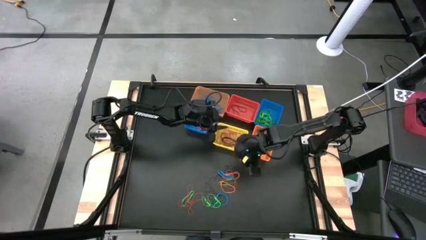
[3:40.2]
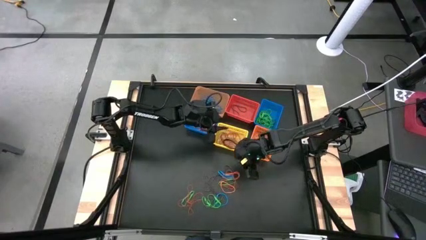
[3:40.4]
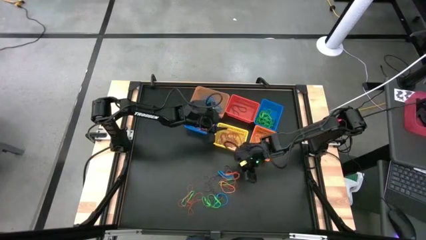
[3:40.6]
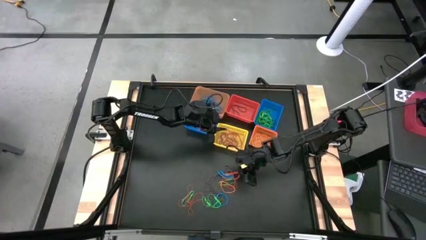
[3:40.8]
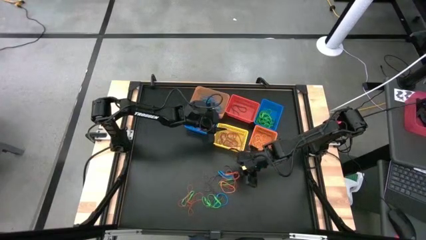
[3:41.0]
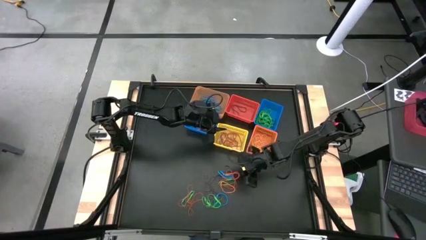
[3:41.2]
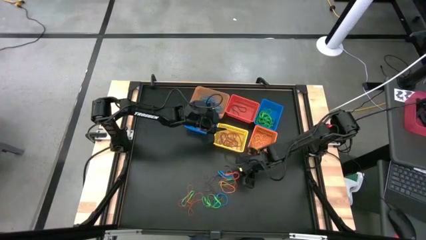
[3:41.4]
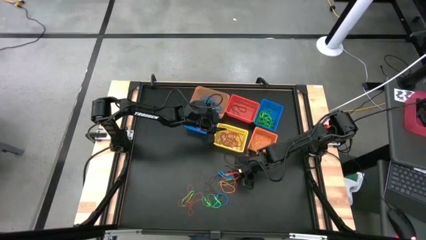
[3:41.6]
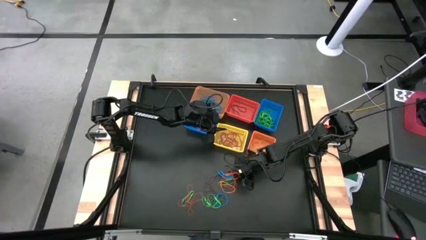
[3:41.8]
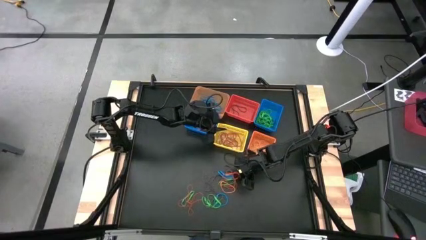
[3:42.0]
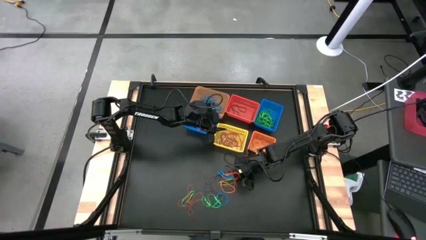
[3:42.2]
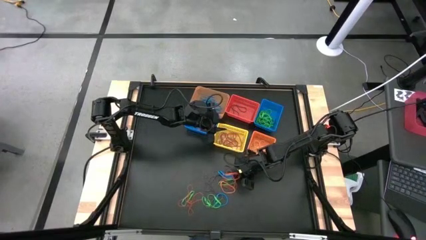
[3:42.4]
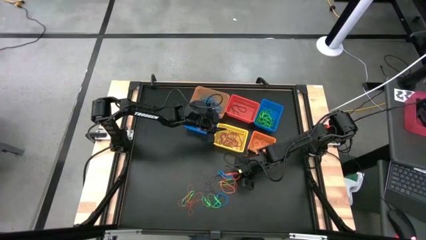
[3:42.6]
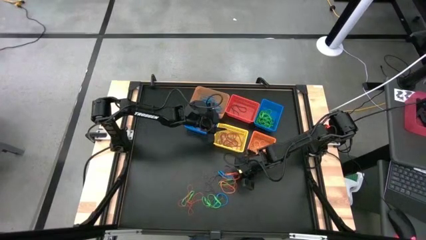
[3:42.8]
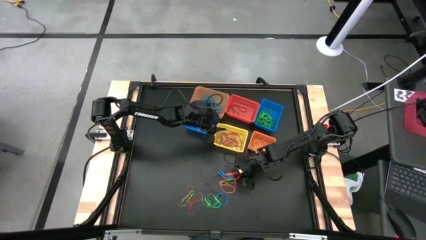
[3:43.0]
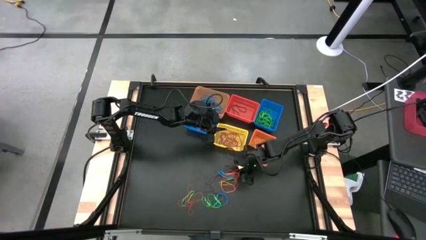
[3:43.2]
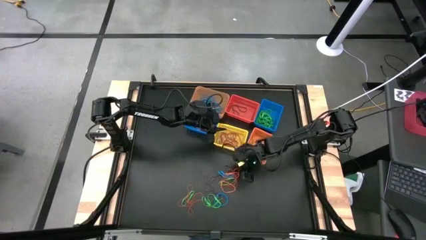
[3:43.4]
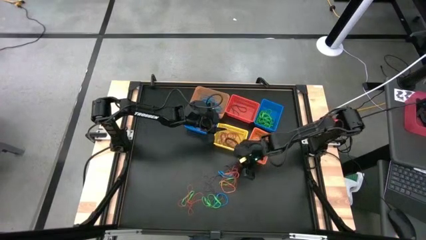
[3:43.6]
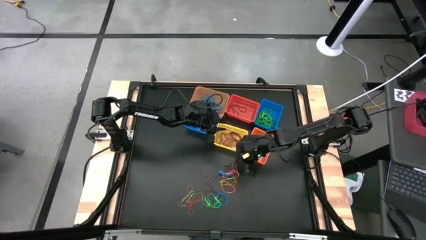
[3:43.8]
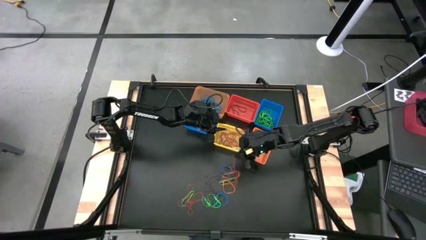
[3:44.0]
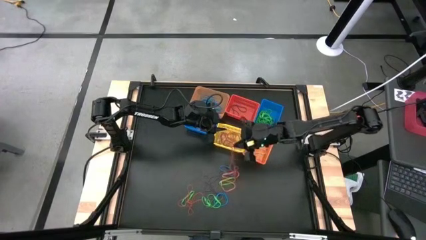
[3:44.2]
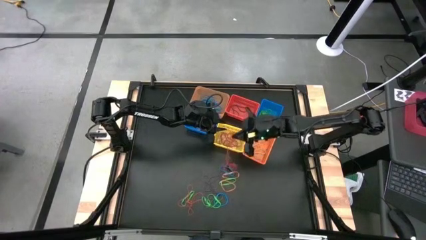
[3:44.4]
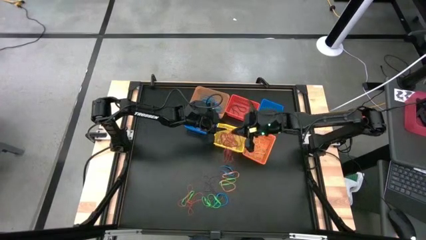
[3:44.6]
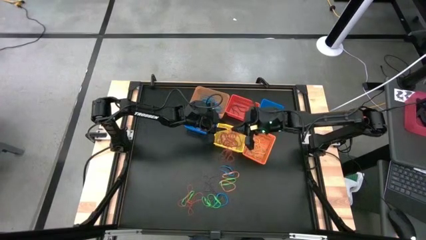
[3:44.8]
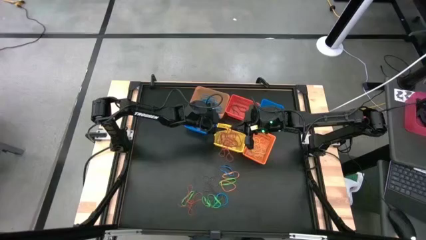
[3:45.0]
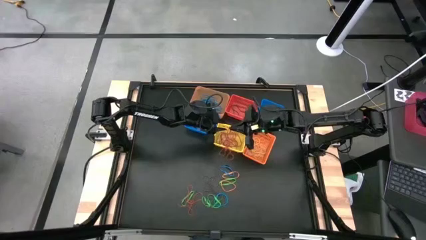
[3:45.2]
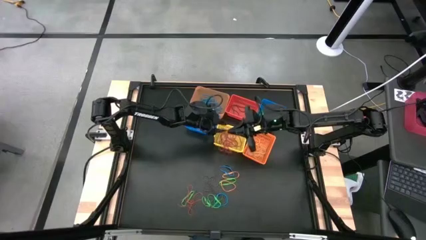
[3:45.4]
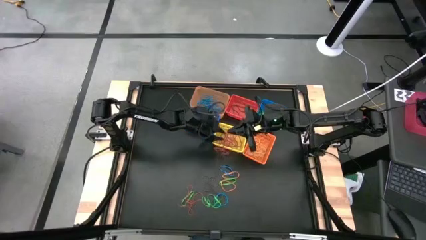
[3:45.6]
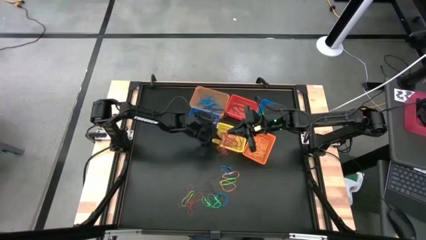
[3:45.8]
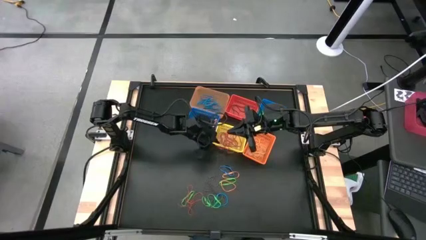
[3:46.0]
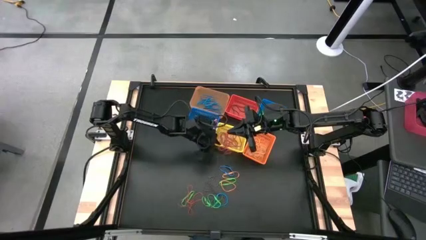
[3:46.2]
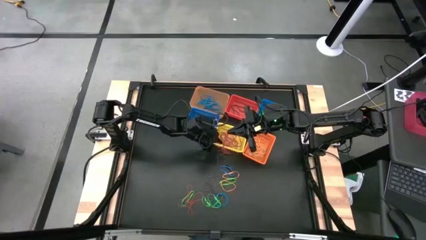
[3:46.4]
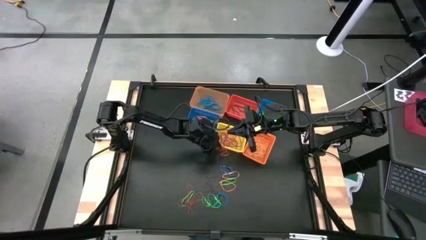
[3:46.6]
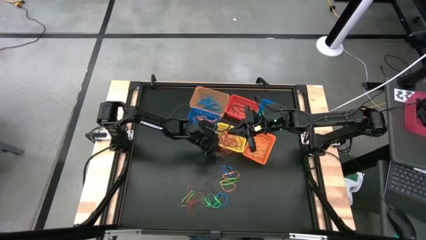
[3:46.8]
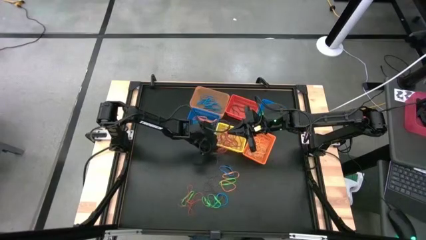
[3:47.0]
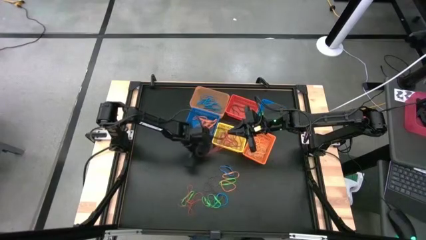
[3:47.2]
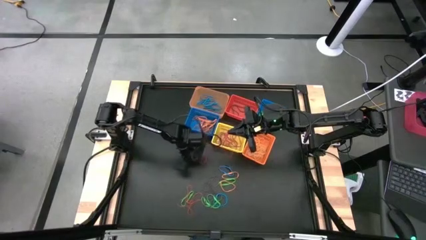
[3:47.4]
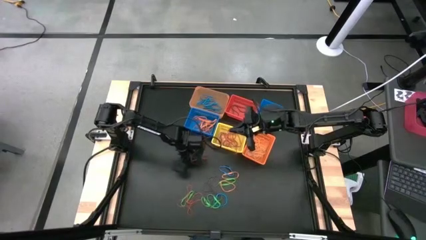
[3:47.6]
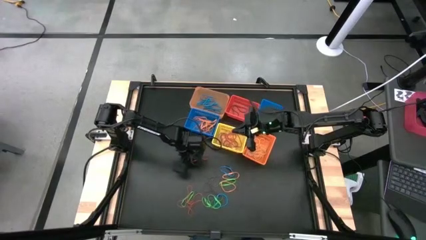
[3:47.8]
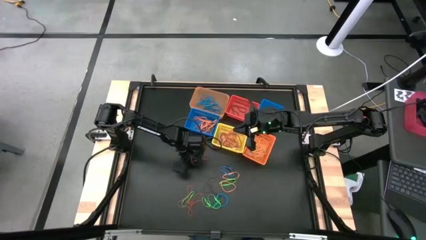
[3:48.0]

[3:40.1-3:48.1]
Task: Sort rubber bands into baskets
Put the red rubber band into the yellow basket

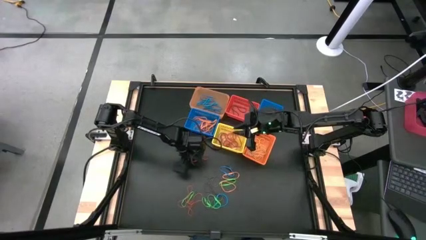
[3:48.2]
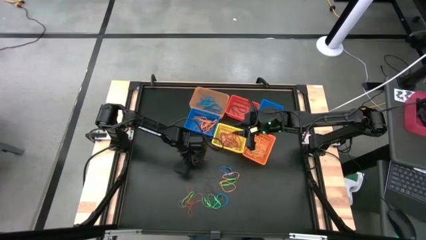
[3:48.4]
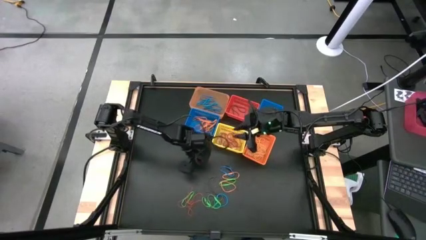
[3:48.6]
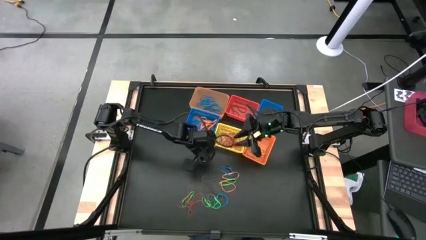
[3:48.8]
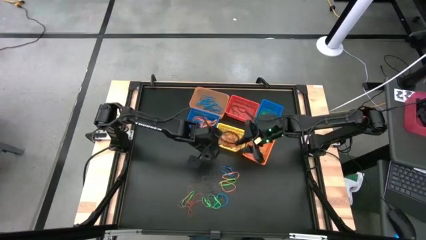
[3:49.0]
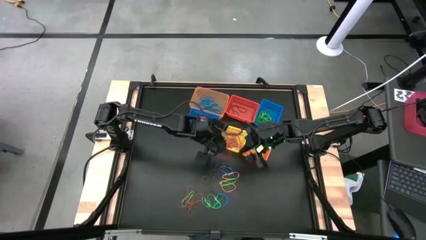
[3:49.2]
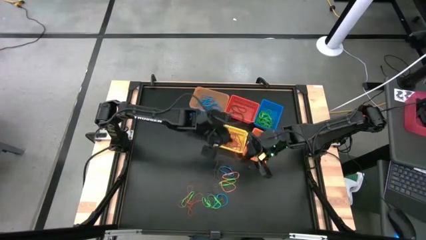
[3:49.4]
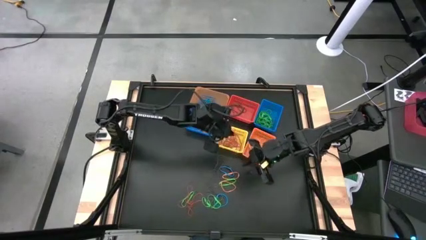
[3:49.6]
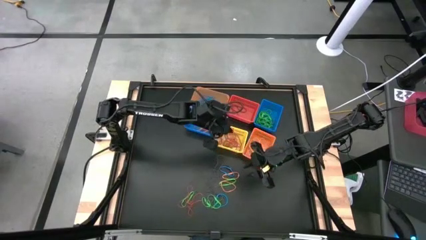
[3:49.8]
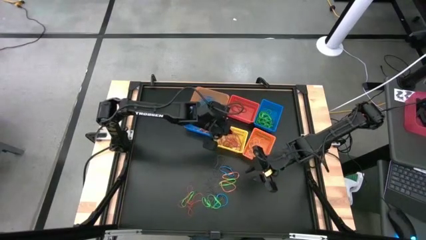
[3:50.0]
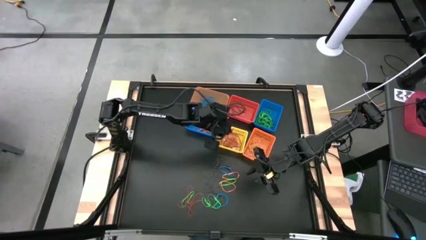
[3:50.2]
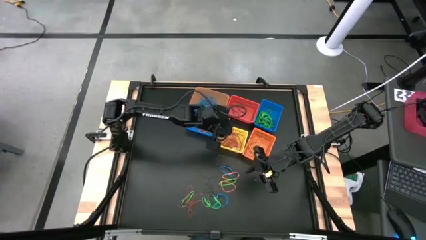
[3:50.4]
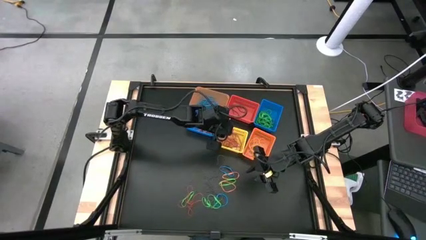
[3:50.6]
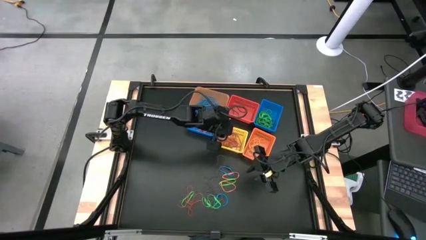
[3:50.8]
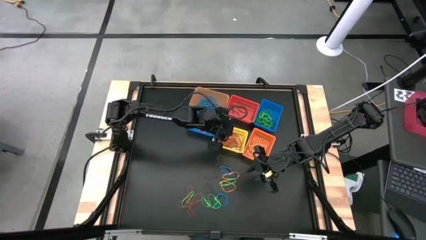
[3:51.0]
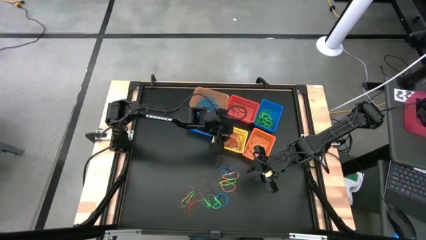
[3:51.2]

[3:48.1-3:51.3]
Put the red rubber band into the yellow basket

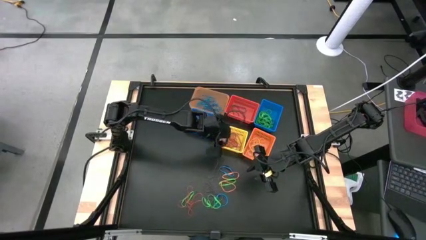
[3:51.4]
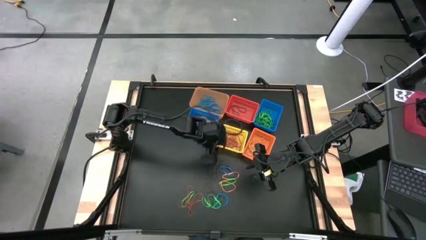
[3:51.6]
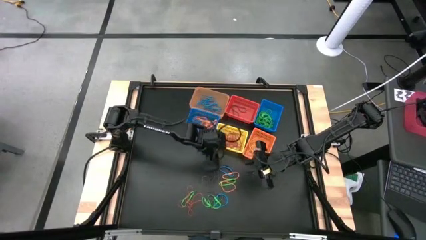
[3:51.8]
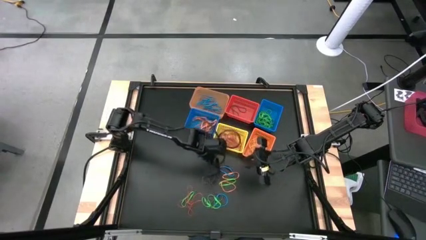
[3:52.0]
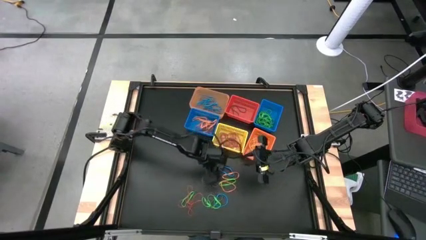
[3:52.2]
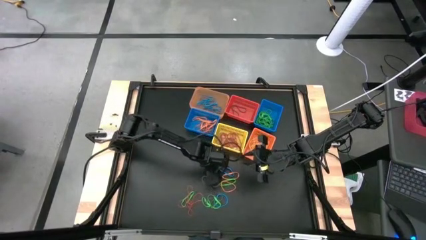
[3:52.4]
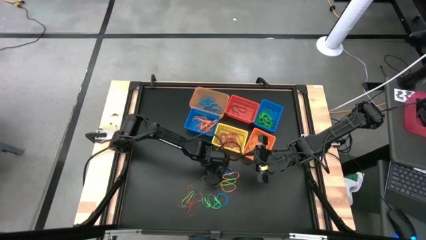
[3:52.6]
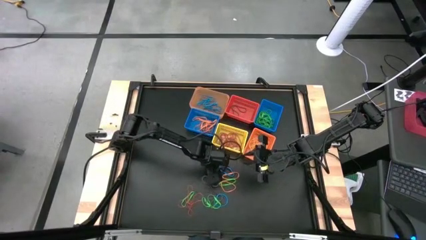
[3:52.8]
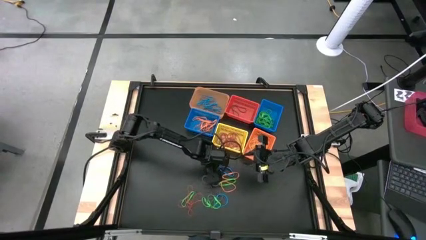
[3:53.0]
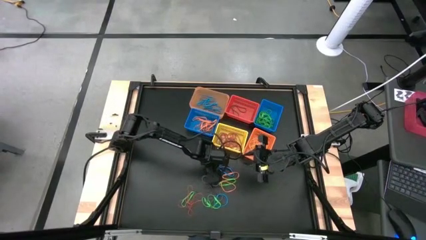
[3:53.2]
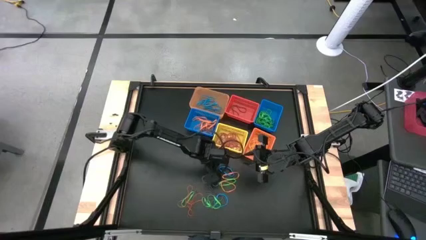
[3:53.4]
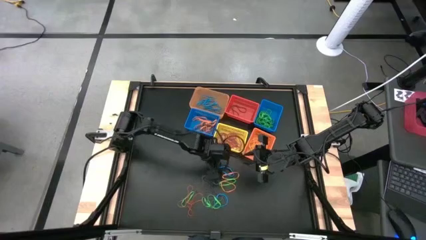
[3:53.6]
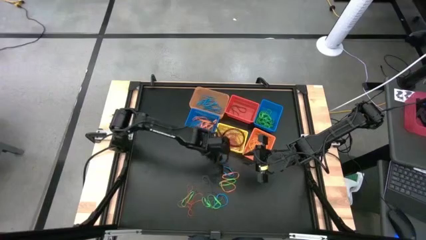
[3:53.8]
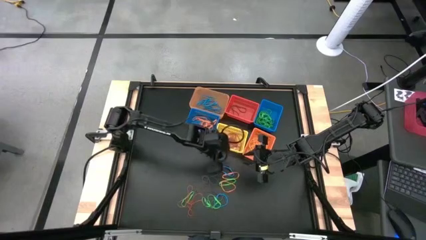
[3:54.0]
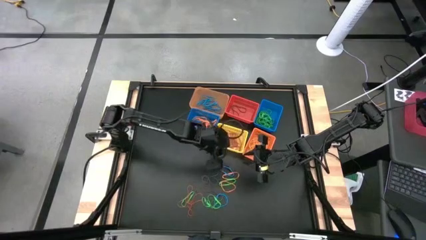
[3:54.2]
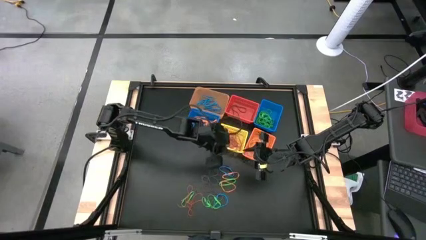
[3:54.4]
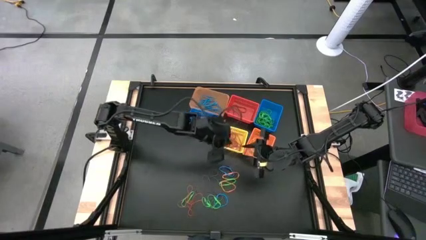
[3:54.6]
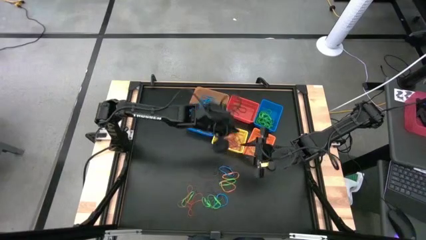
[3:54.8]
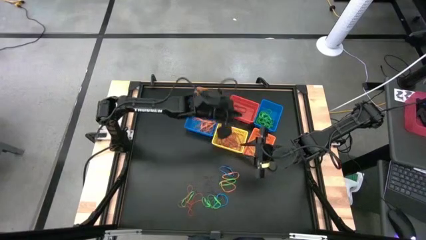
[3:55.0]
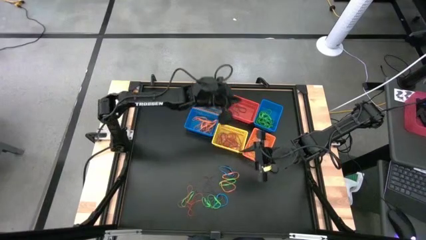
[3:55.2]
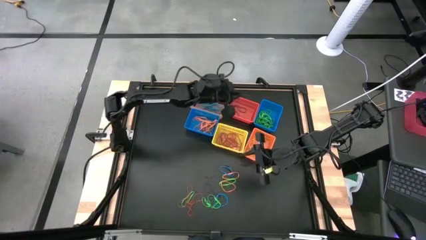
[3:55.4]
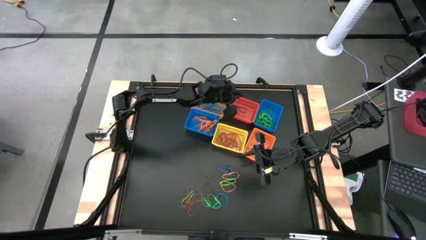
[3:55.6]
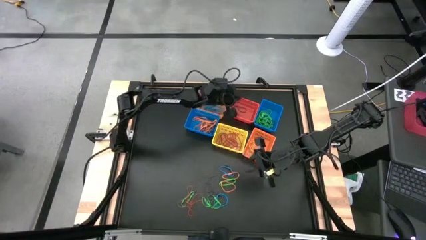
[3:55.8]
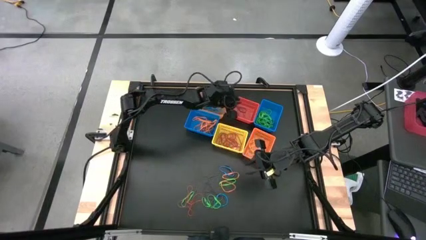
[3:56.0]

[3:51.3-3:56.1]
Put the violet rubber band into the pink basket

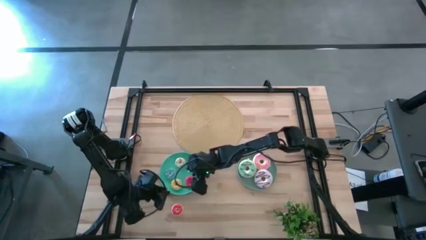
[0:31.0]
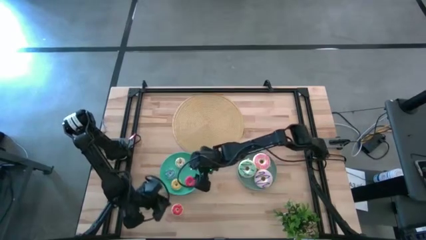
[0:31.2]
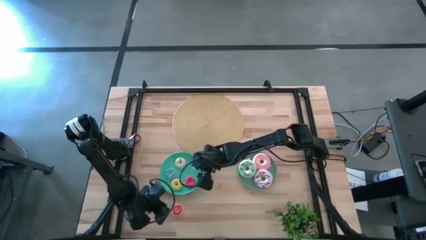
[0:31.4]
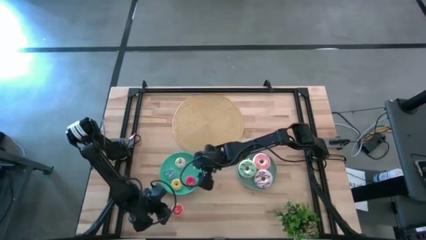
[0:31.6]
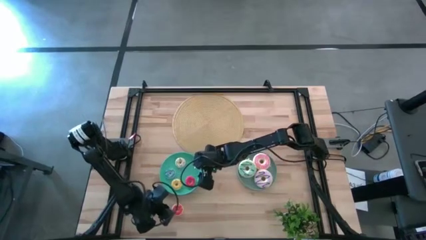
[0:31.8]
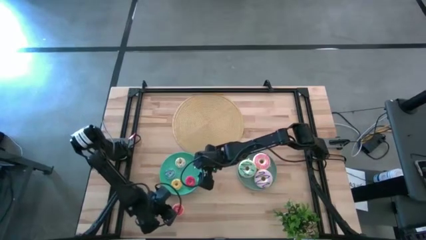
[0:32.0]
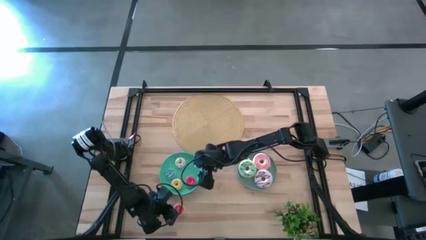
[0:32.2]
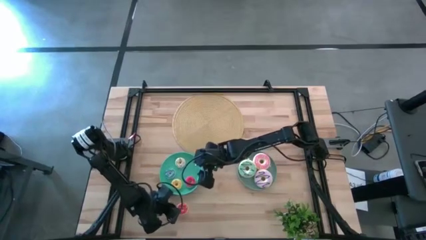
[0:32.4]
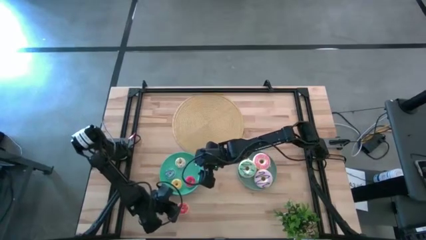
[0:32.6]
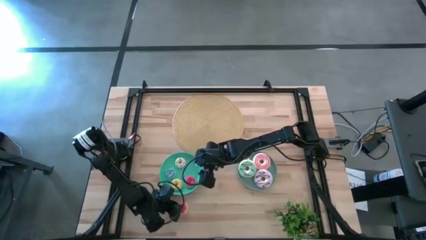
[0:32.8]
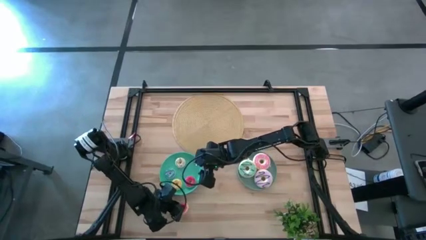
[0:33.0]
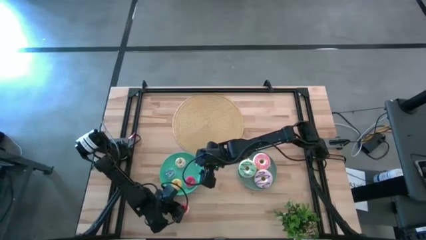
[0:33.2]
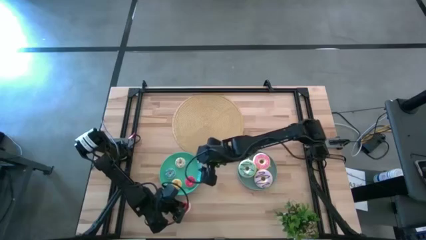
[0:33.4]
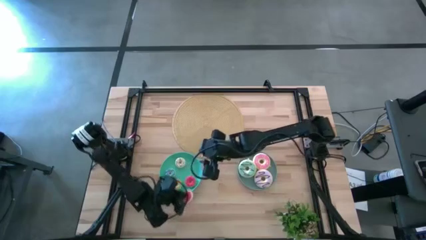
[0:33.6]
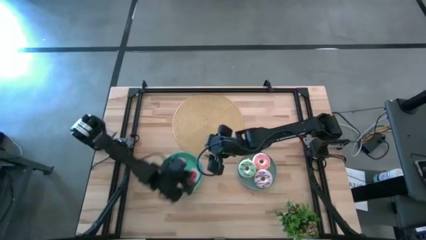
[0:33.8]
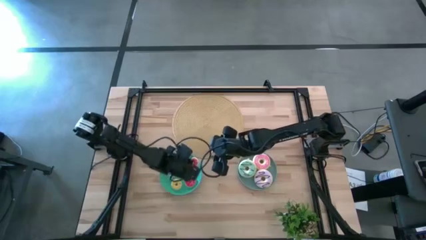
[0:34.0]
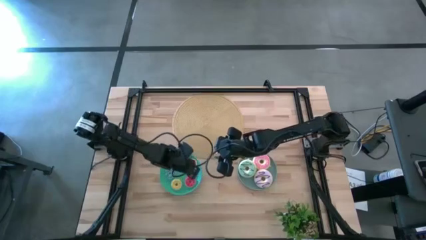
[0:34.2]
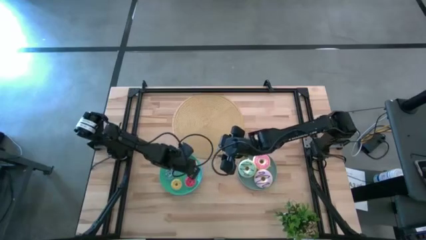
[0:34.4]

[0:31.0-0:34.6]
Task: Pick & Place donuts
Put the small orange donut on the light green plate
